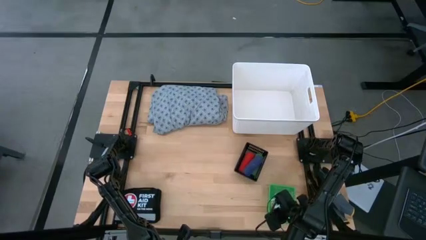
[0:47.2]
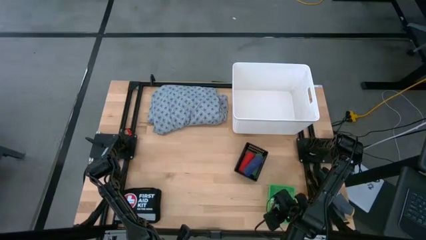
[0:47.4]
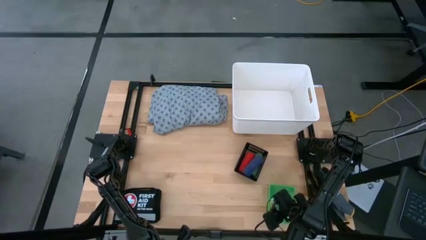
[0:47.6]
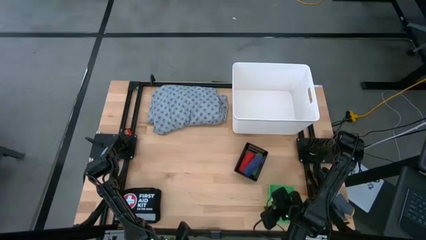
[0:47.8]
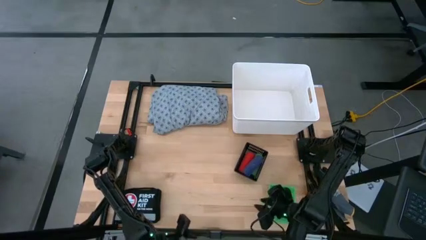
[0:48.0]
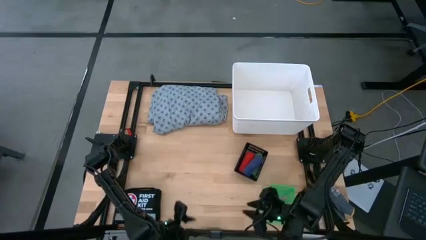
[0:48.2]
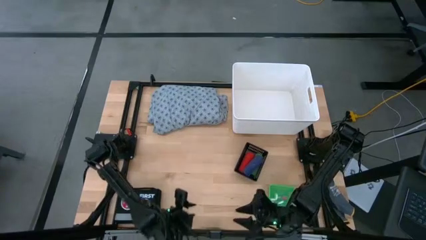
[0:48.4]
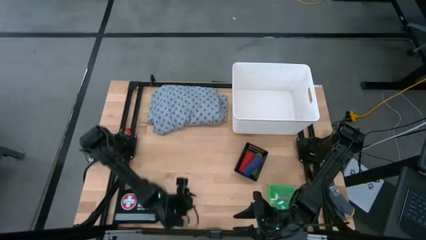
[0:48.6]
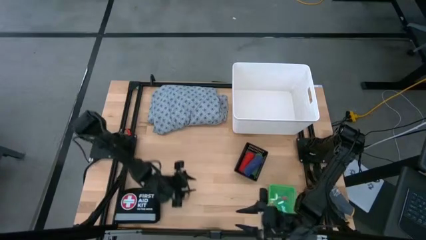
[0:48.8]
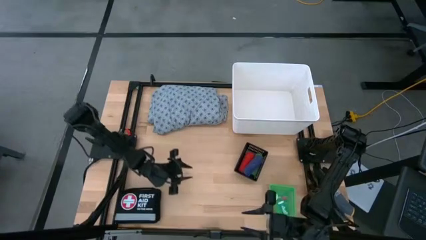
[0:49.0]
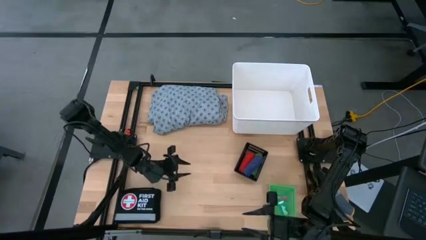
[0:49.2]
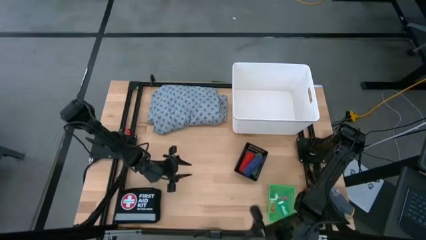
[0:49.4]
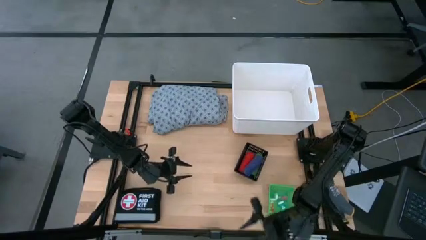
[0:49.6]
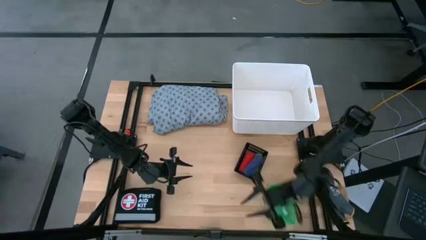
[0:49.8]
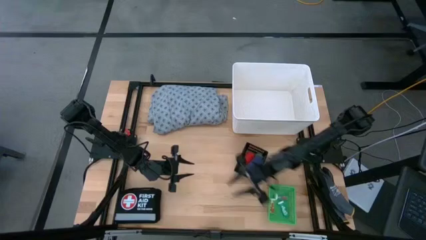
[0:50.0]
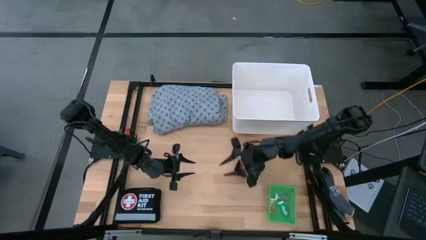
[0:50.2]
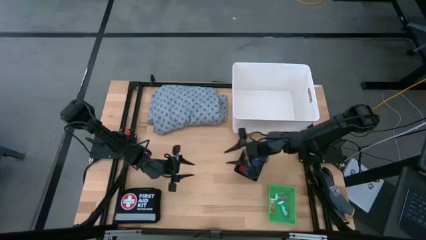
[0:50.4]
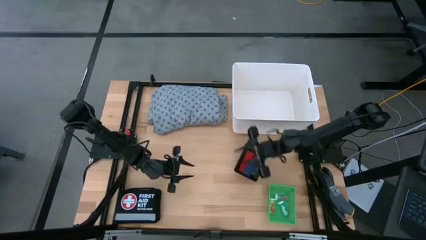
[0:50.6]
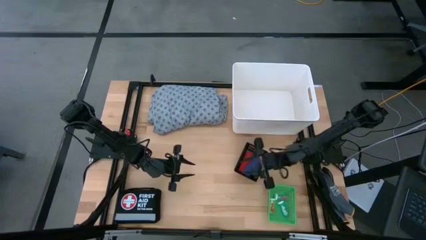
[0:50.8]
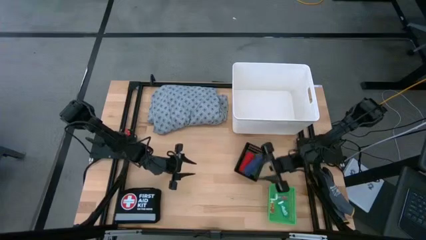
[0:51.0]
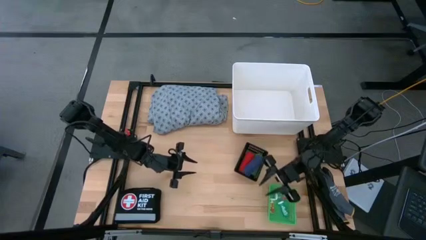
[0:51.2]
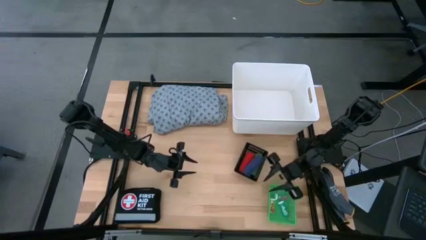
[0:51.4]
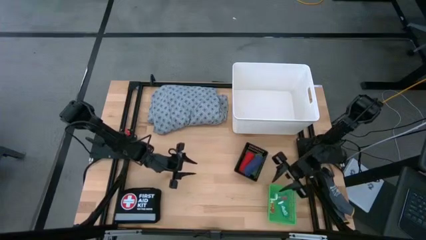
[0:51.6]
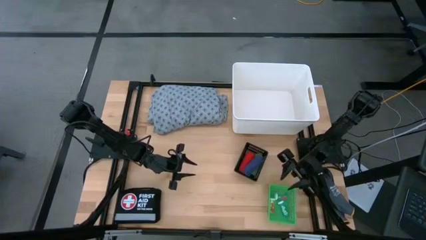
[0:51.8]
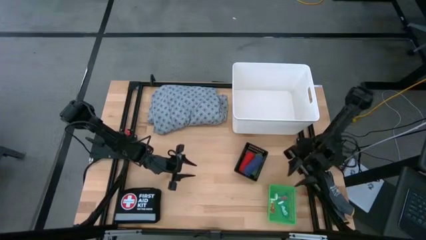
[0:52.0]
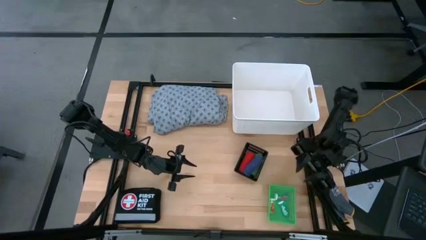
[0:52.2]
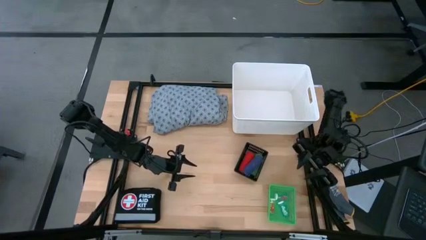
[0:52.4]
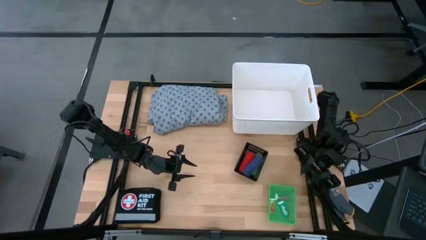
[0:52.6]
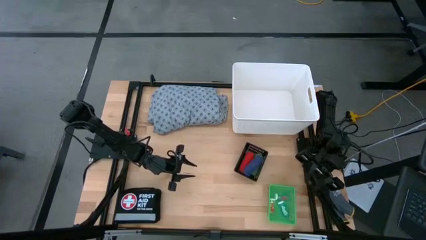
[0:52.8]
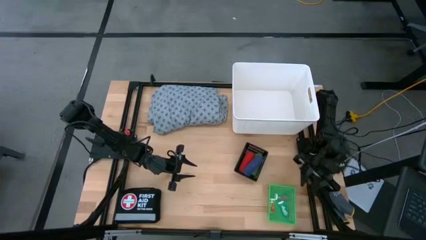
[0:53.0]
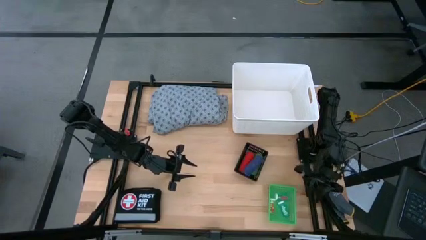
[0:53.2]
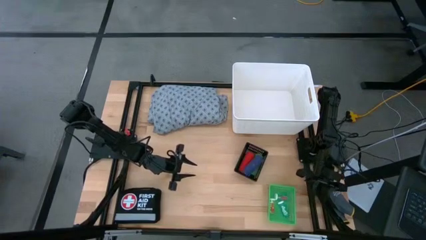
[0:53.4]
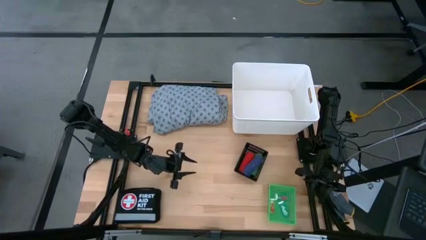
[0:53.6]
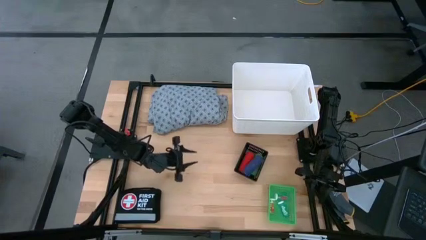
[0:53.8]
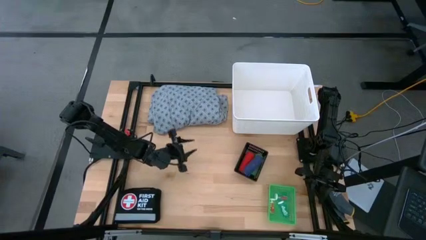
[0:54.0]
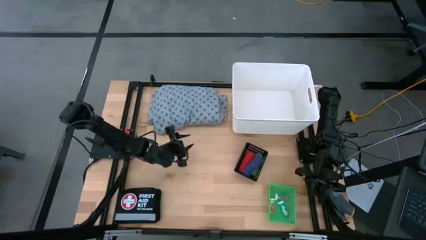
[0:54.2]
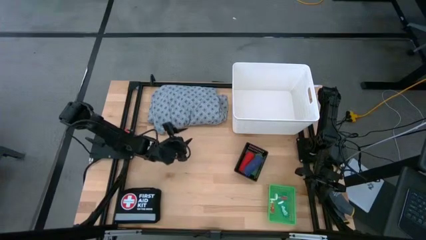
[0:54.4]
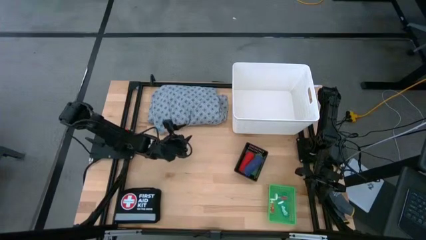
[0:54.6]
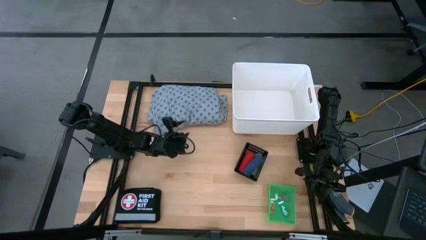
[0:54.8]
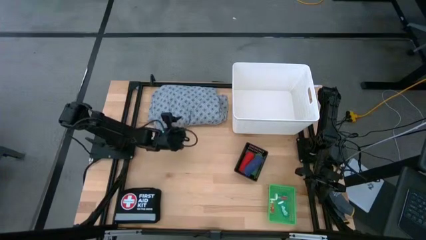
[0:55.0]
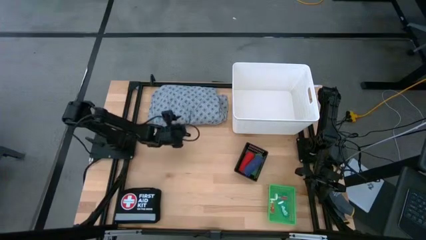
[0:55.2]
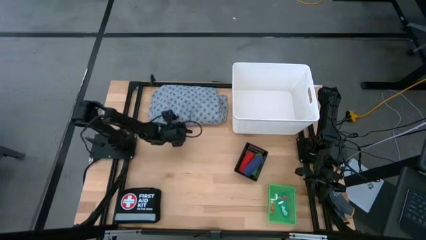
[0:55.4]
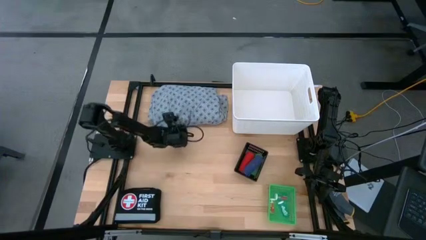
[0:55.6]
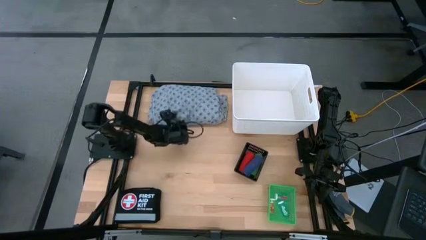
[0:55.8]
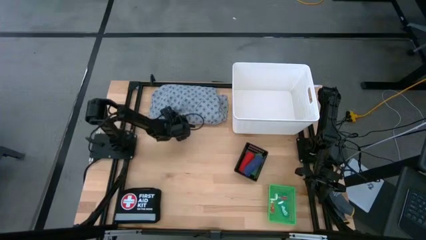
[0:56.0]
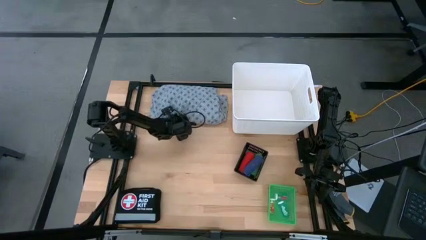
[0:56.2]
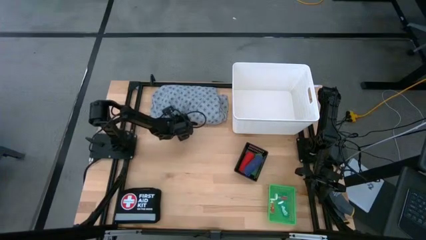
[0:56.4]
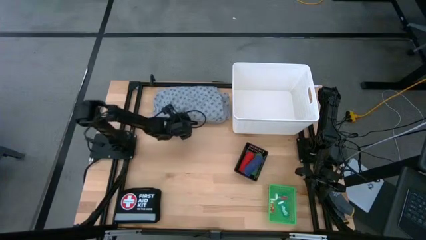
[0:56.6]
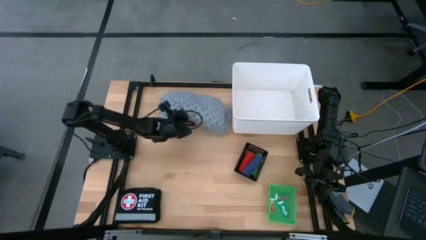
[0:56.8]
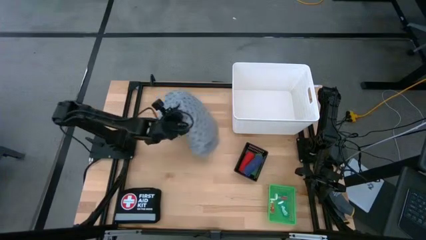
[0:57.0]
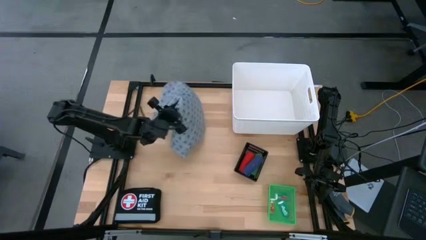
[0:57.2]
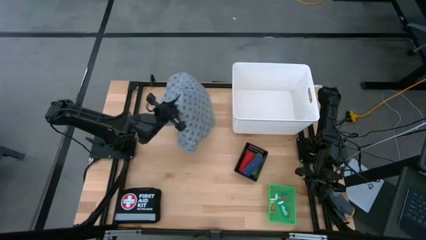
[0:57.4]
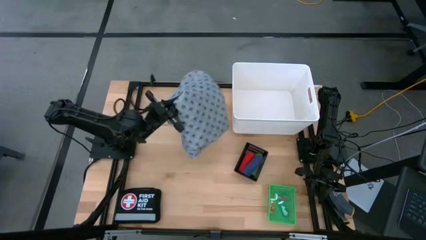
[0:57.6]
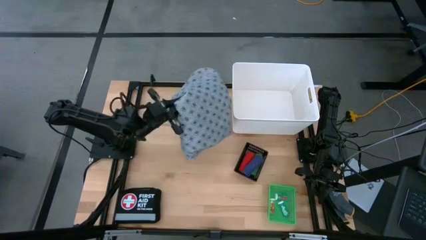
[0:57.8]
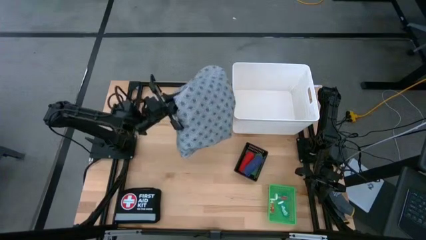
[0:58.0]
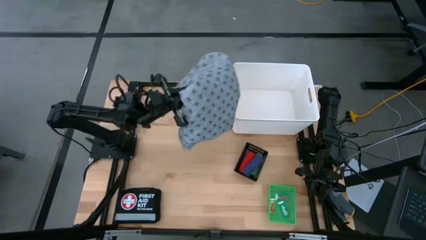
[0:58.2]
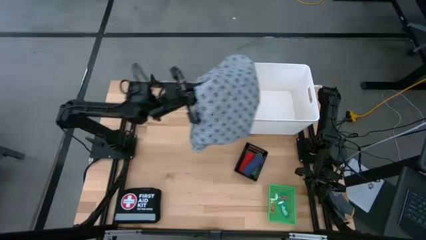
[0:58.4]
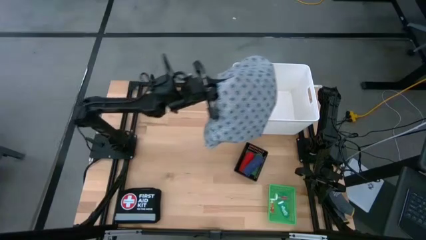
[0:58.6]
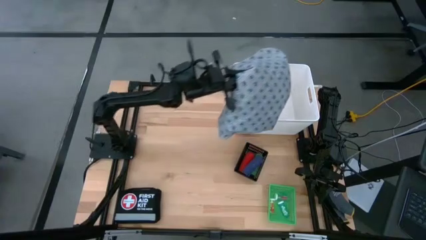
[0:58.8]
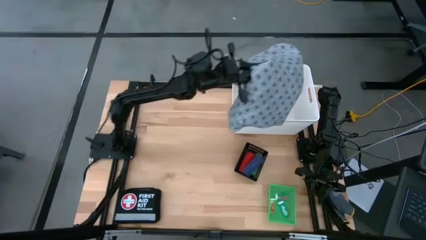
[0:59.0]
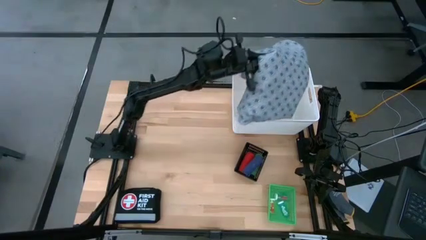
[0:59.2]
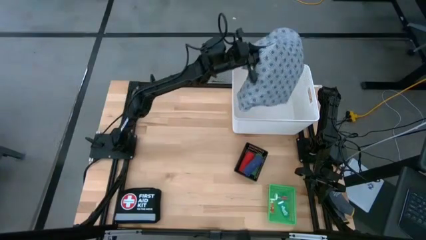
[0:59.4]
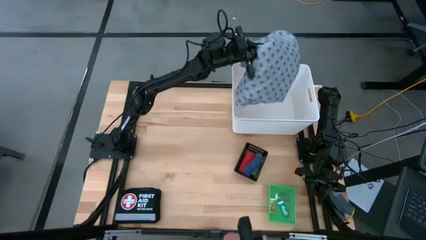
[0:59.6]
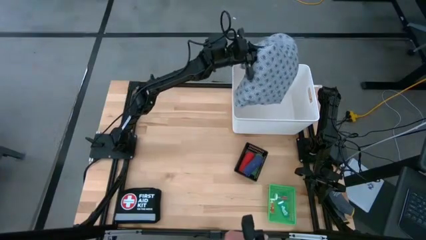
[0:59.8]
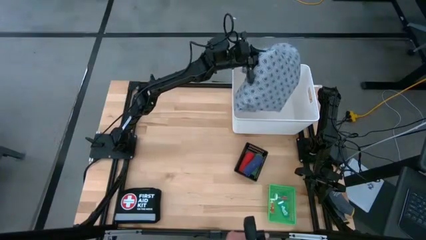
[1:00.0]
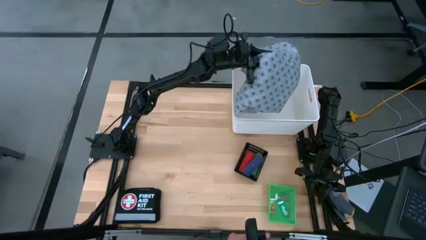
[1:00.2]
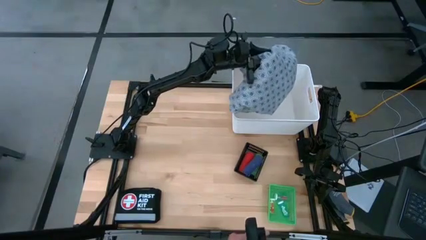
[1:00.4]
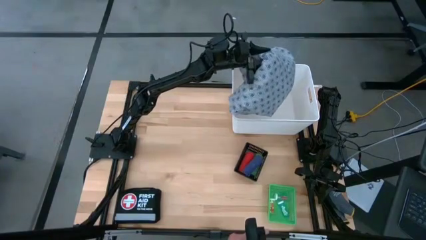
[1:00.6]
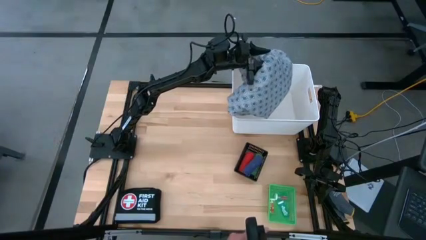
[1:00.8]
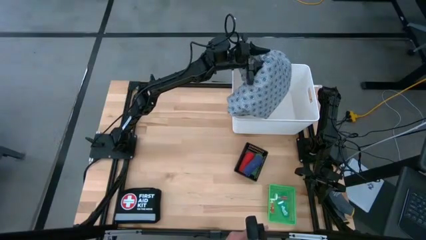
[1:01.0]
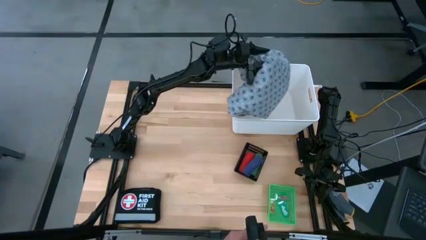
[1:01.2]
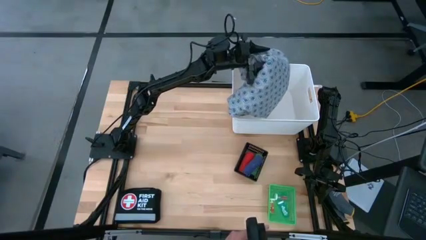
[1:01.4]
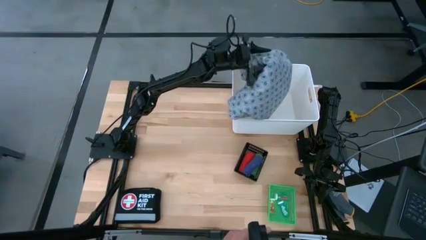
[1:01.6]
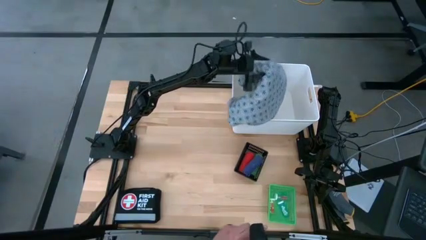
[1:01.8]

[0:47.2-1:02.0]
Task: Pick & place medical supplies in basket/bin
Put the gray patient gown into the white bin

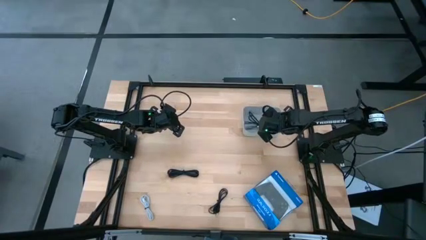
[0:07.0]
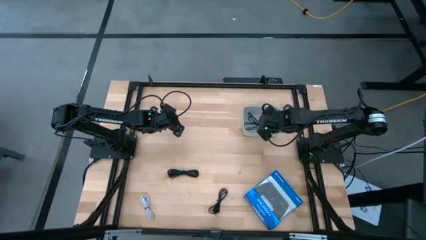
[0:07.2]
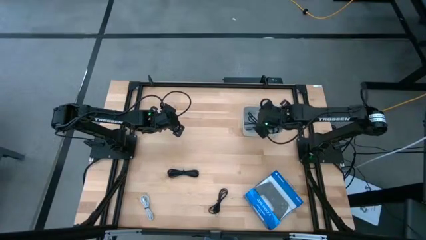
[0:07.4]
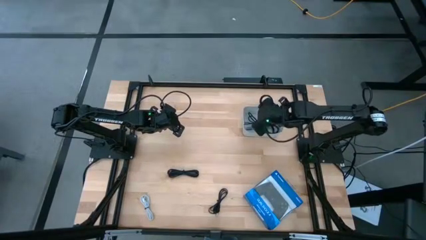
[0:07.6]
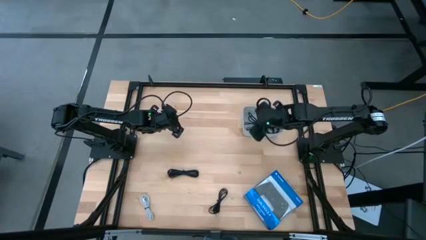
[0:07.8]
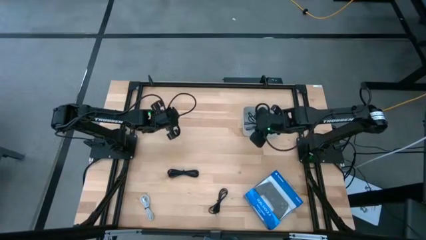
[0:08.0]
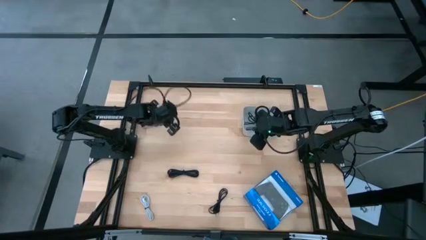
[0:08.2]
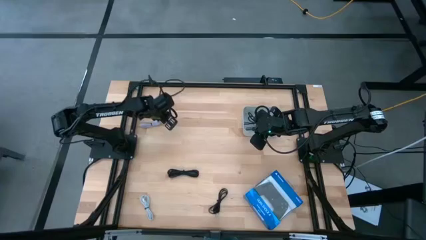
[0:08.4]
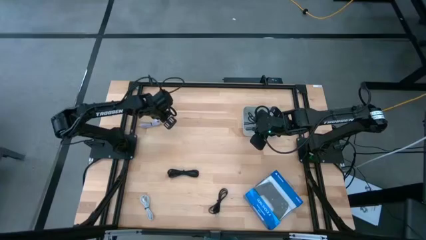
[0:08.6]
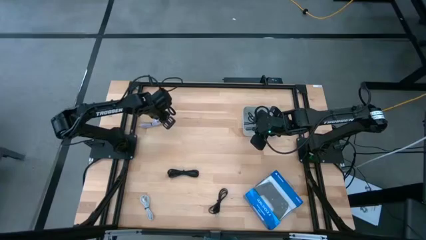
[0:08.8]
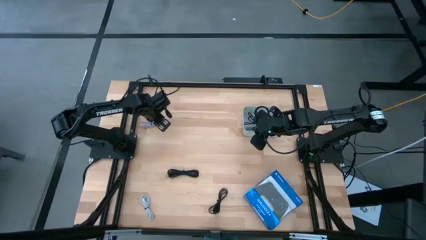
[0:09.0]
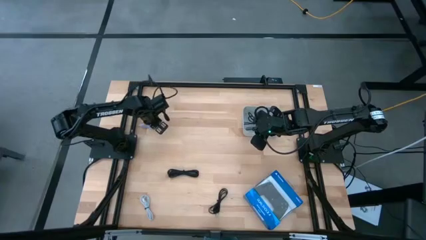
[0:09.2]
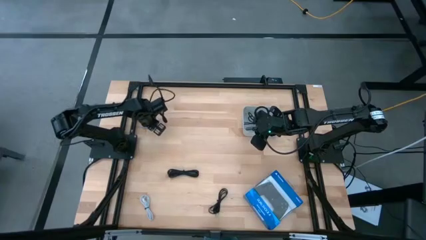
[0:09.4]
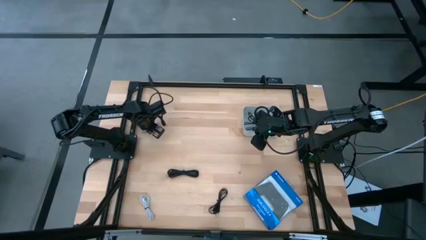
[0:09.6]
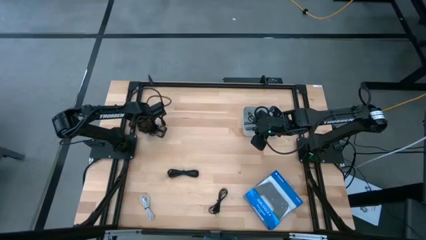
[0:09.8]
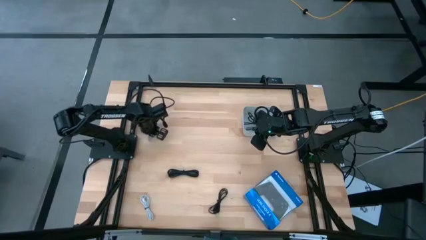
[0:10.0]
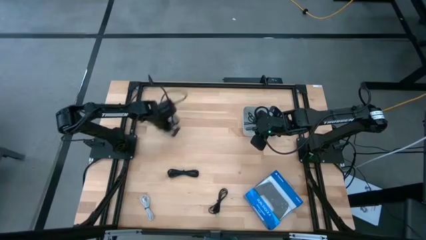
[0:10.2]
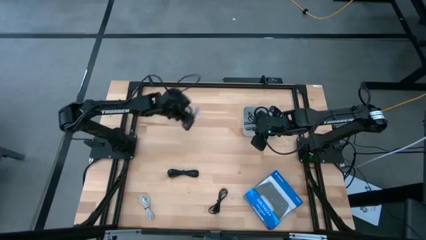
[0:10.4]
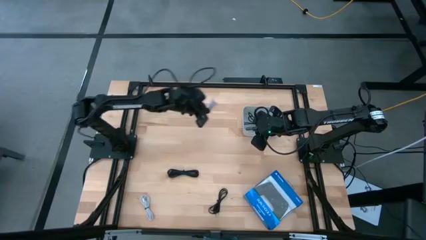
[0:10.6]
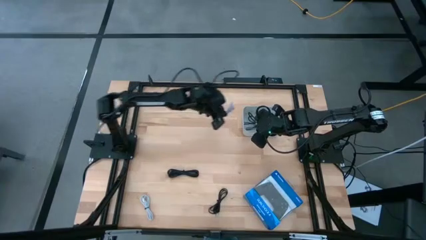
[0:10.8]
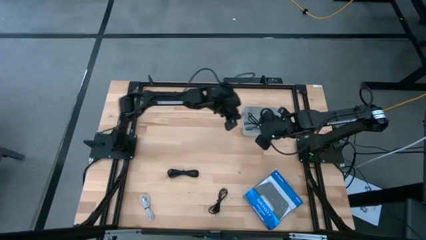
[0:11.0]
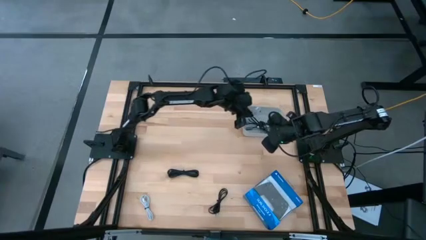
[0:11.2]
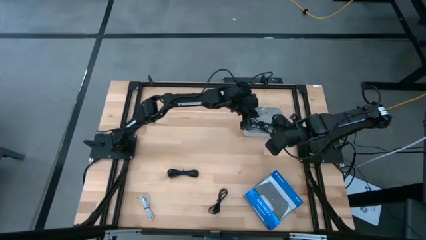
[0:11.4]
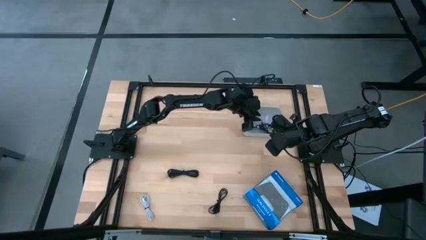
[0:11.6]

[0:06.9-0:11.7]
Task: Pick and place USB-C Cables
Put the gray USB cable into the gray bin
